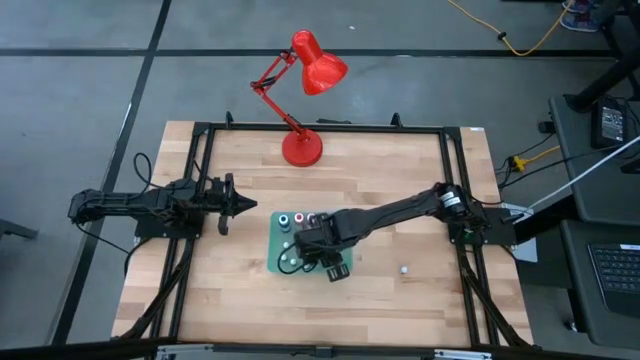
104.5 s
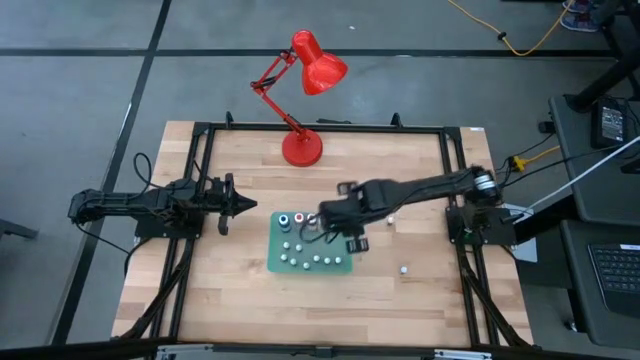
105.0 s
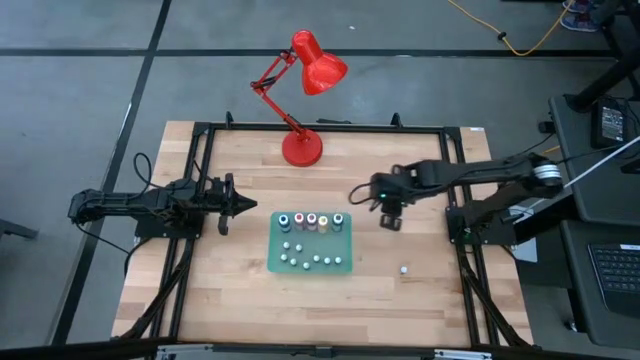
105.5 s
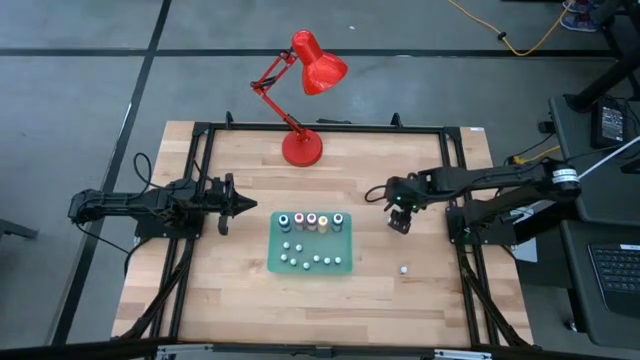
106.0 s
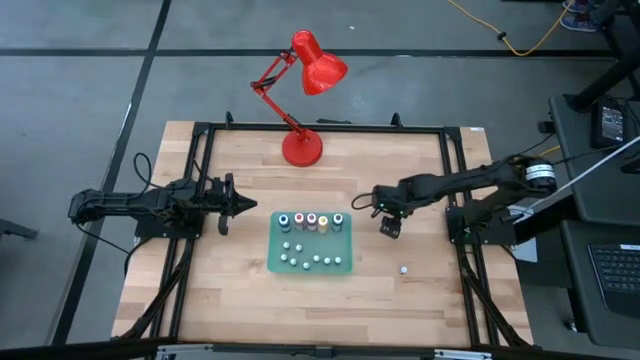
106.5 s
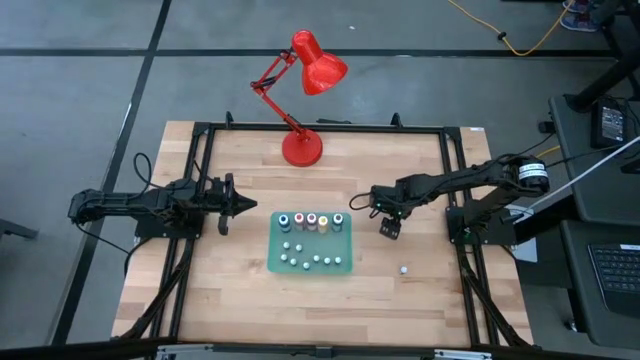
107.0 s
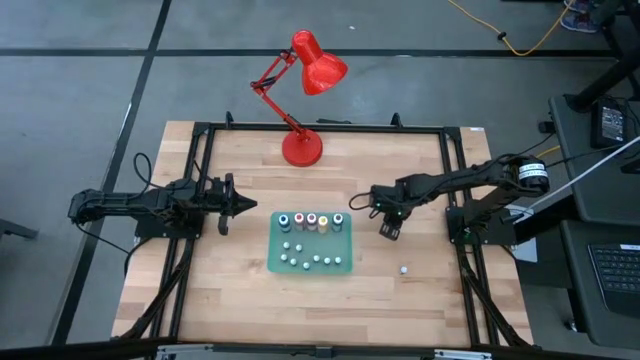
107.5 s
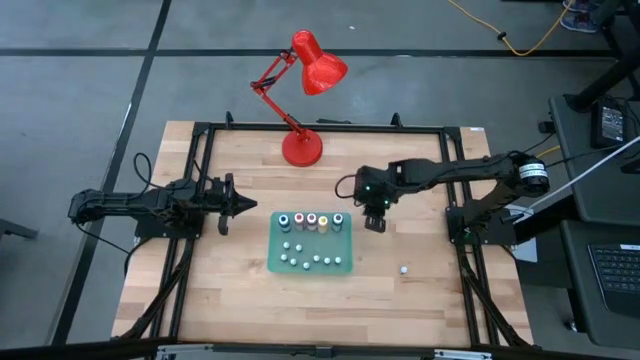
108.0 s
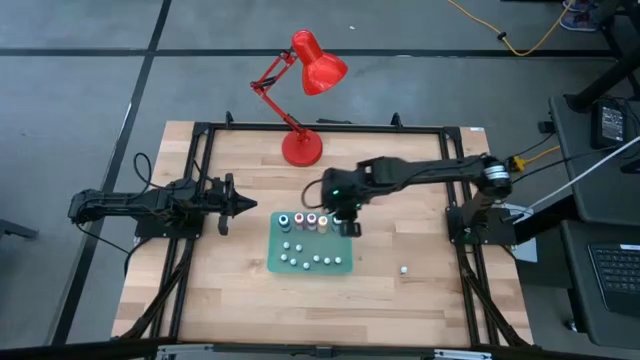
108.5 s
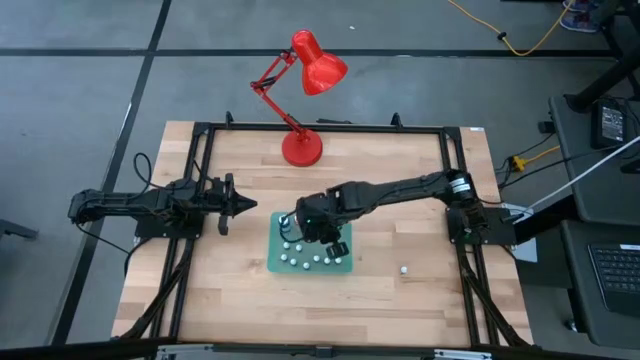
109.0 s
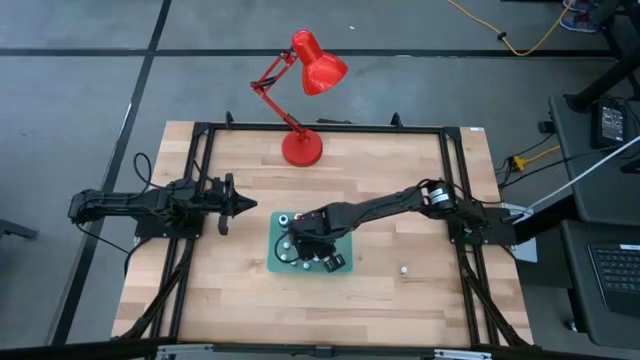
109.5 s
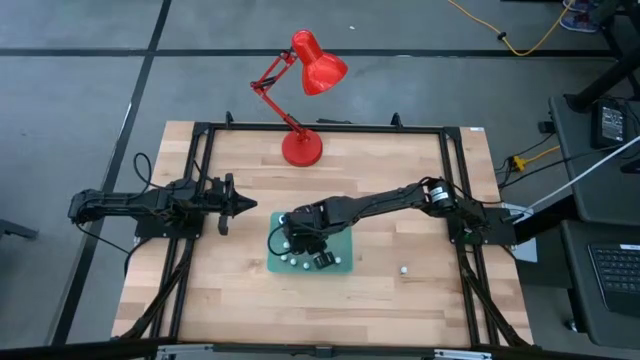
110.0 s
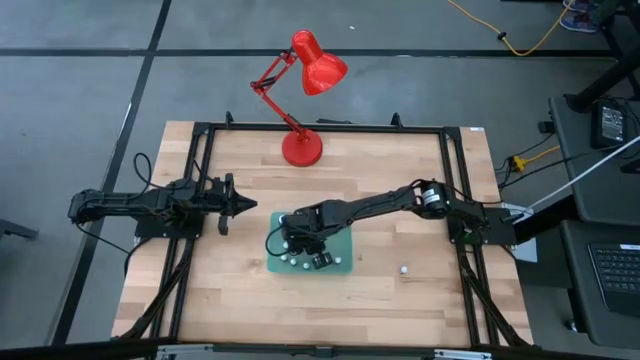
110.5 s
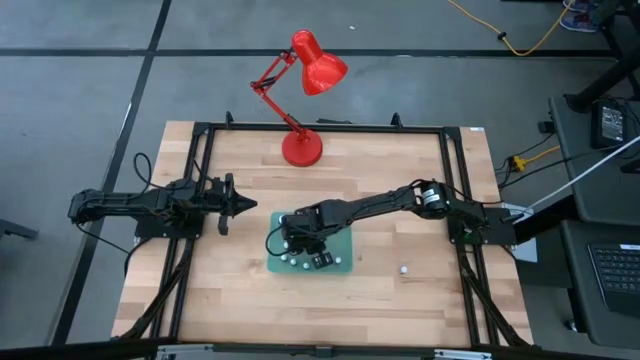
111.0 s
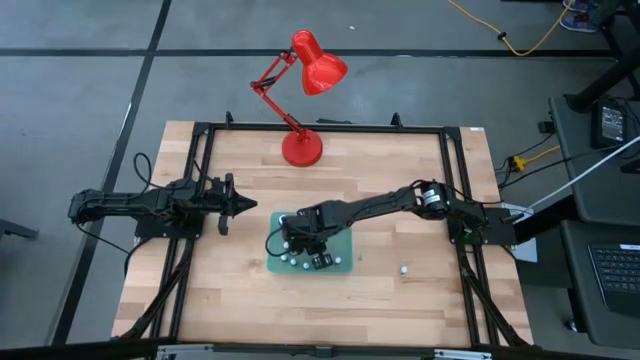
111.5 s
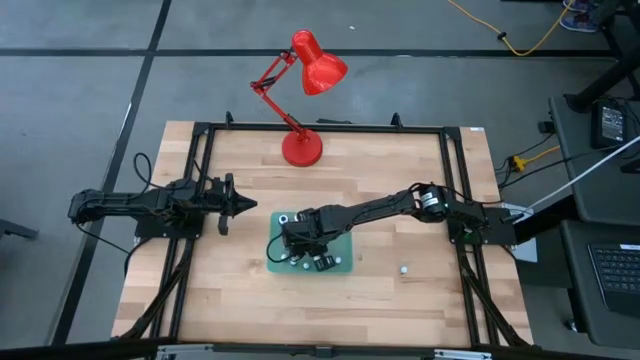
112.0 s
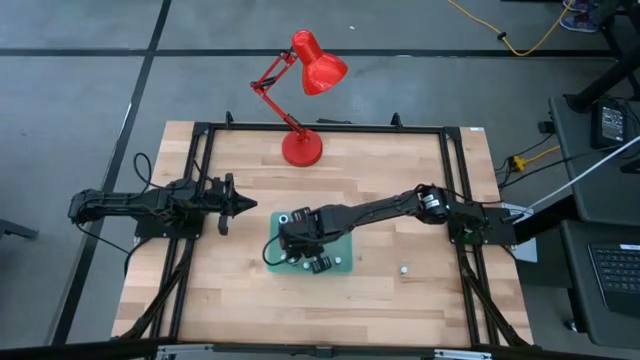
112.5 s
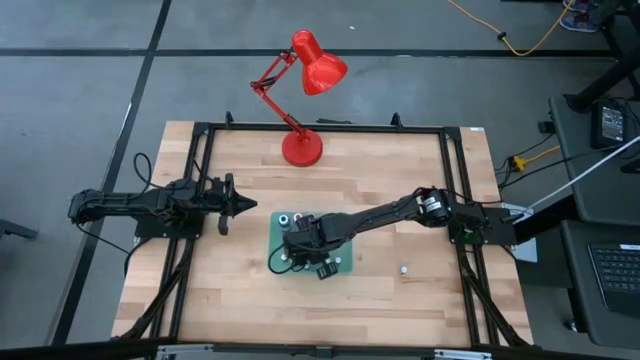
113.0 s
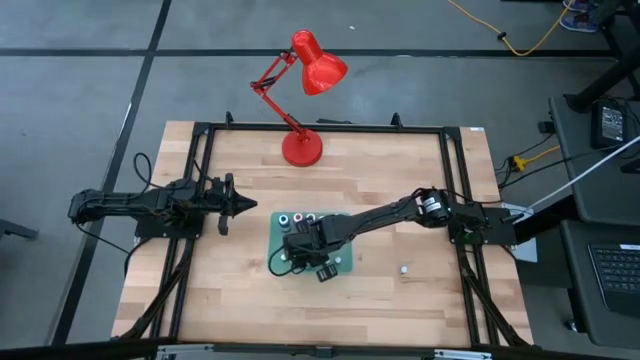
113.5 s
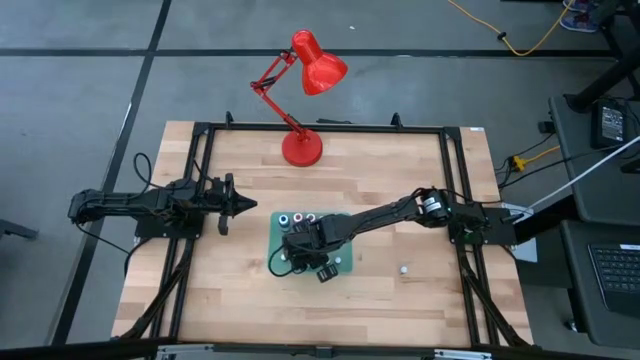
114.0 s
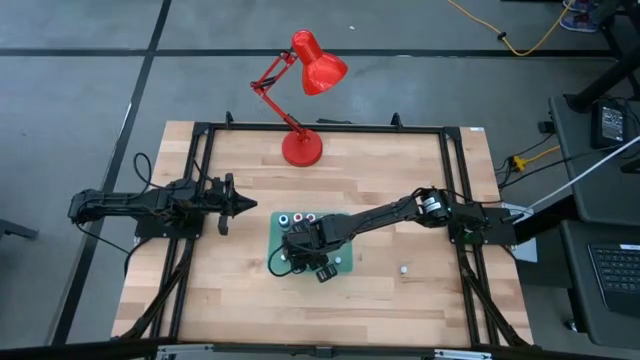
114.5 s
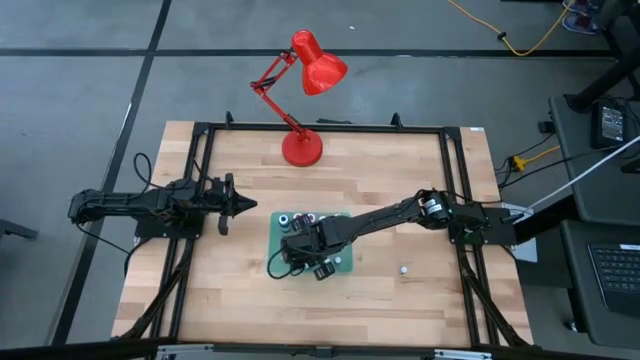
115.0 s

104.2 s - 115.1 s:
Task: Pick & Place food coloring
Put the small pink bottle into the green bin

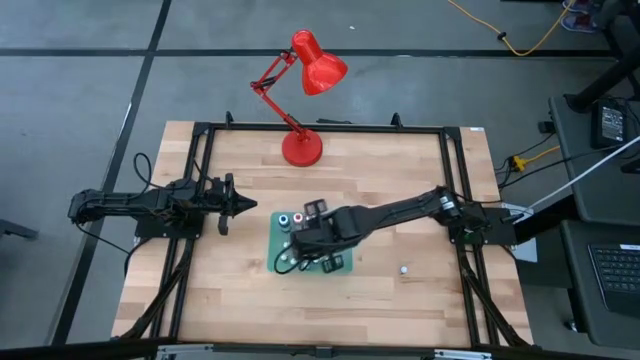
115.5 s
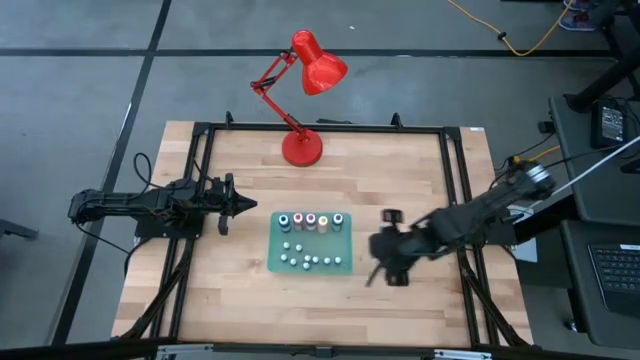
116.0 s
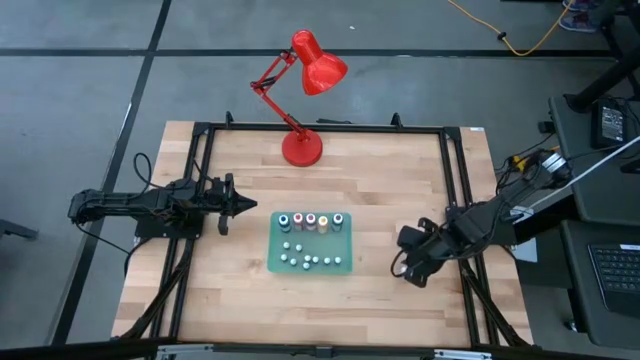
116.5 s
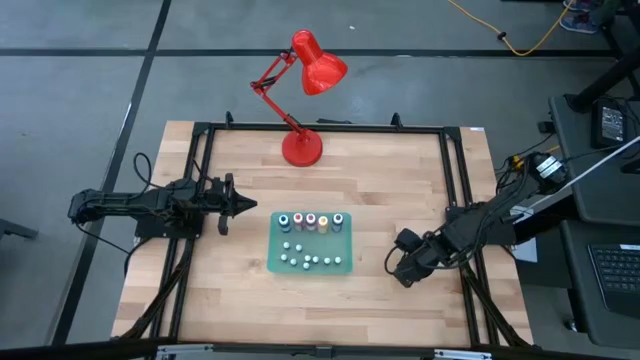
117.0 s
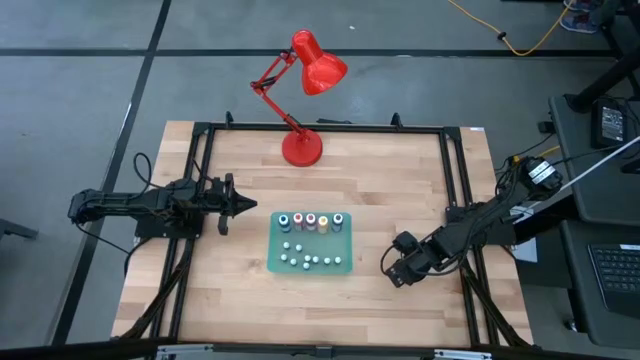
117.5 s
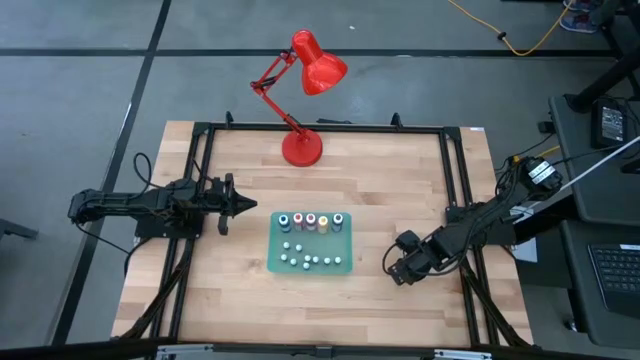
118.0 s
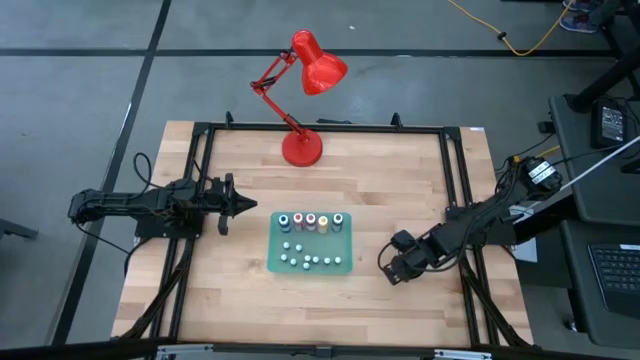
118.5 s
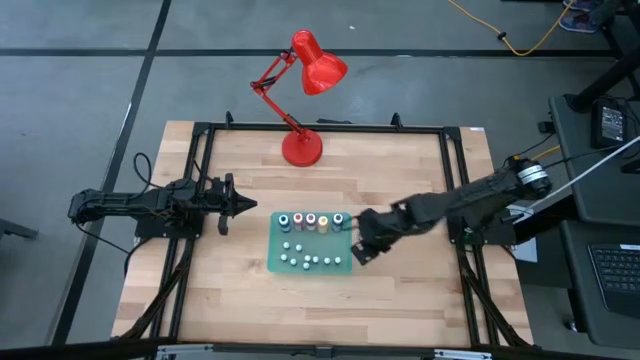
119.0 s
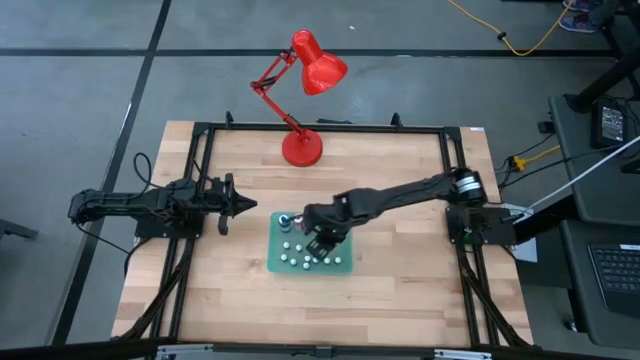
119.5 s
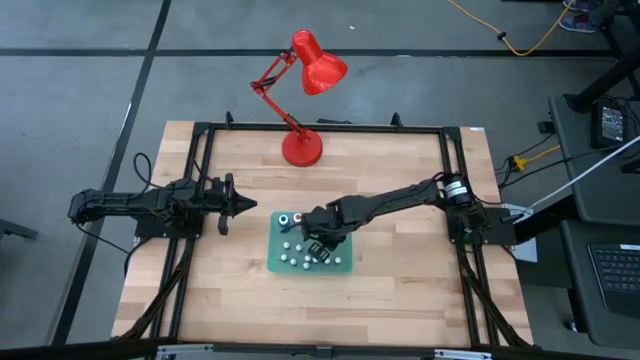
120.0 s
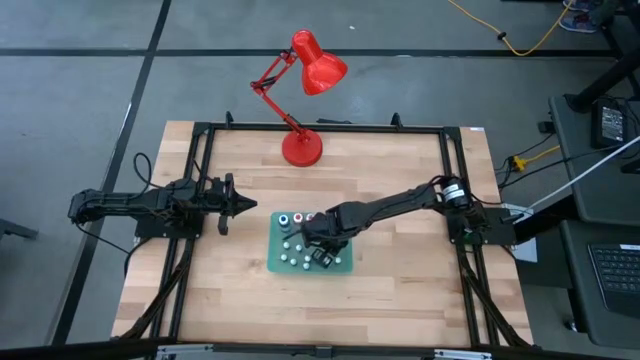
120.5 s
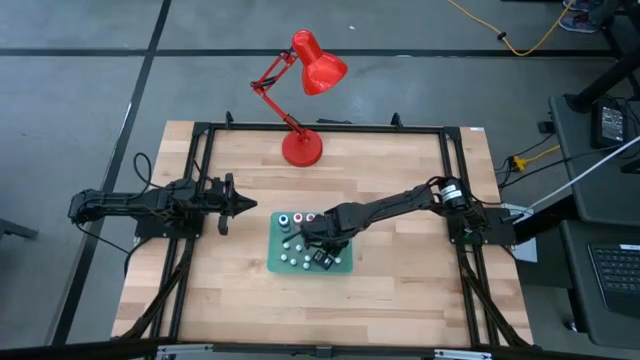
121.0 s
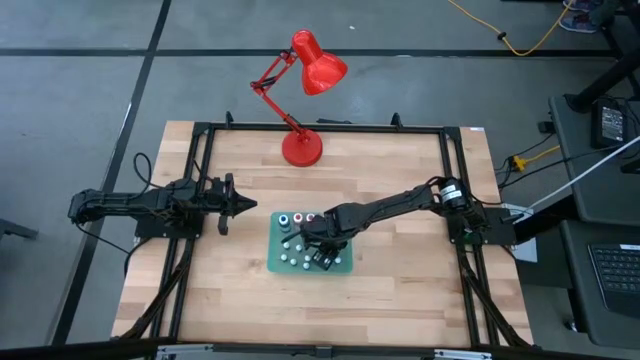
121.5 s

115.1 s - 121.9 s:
Put the small red bottle into the green bin

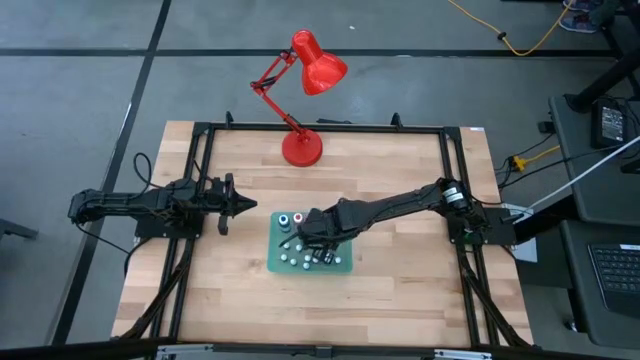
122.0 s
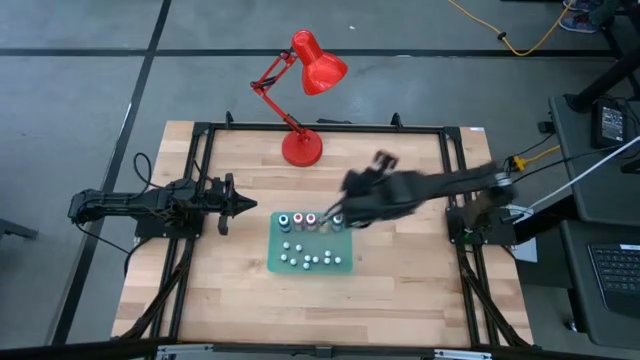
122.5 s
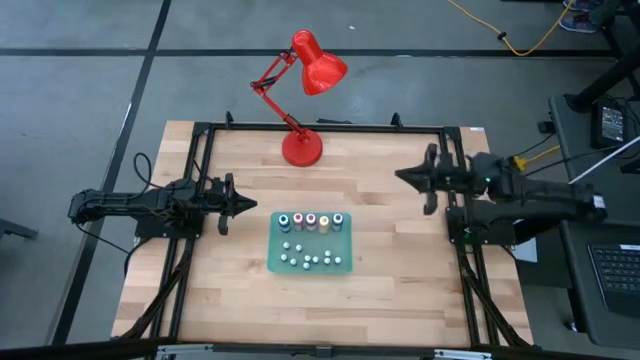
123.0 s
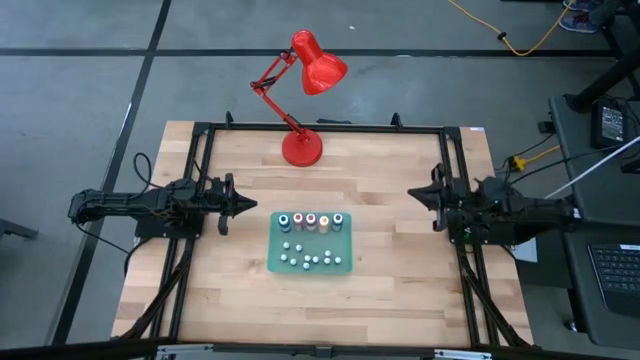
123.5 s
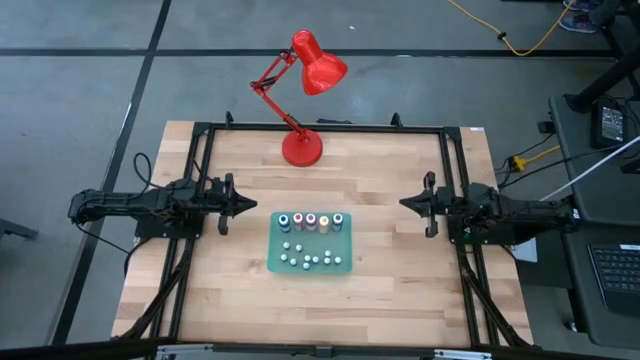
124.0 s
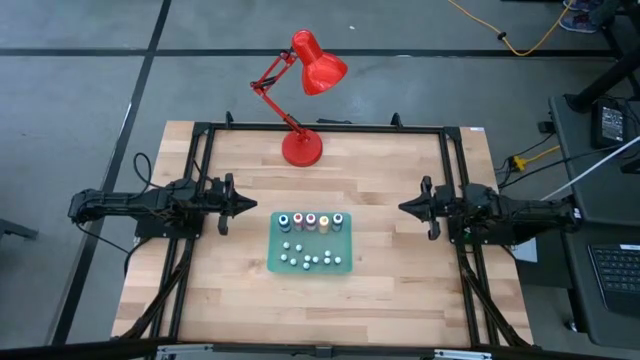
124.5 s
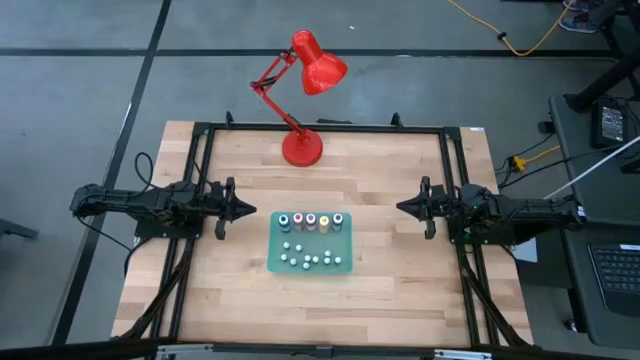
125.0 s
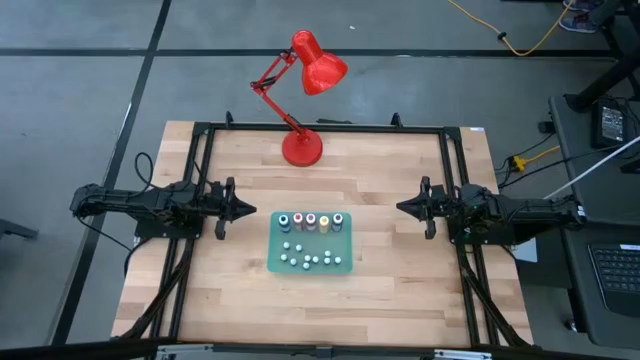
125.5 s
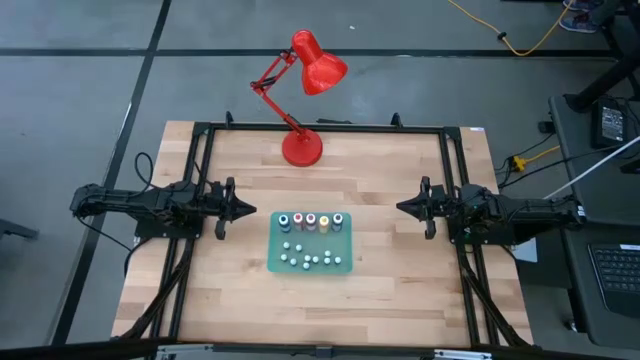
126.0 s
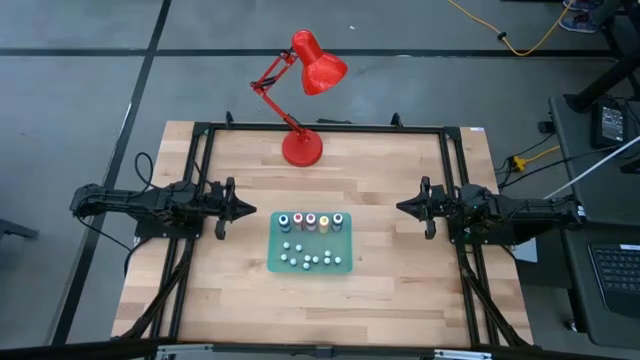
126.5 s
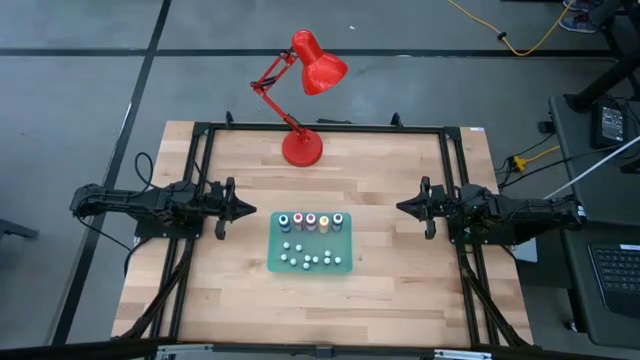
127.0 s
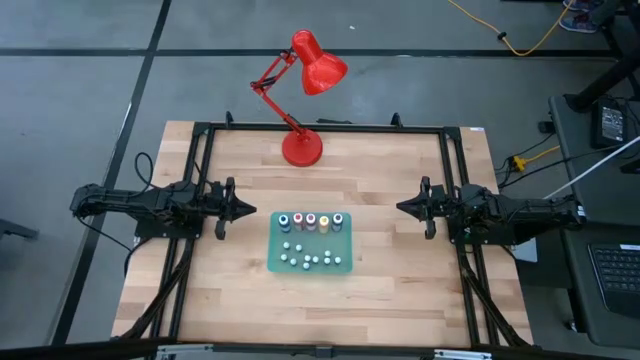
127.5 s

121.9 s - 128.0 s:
Return to Home Position
